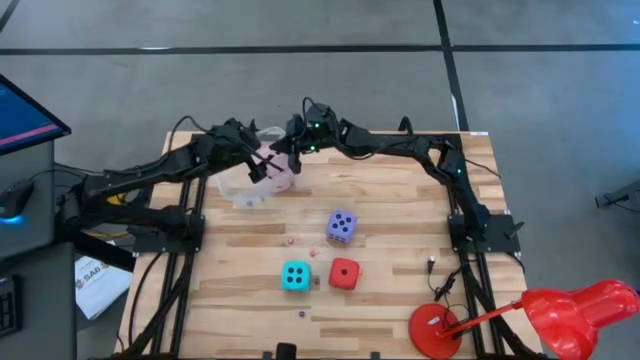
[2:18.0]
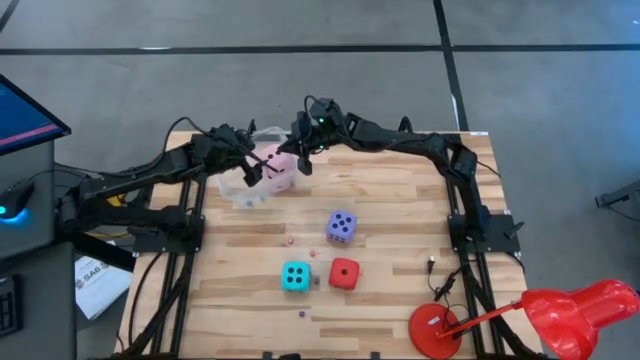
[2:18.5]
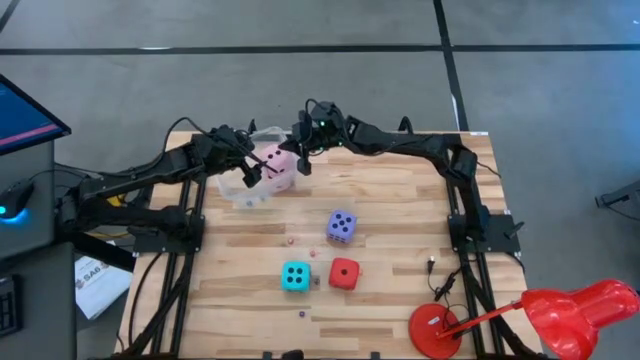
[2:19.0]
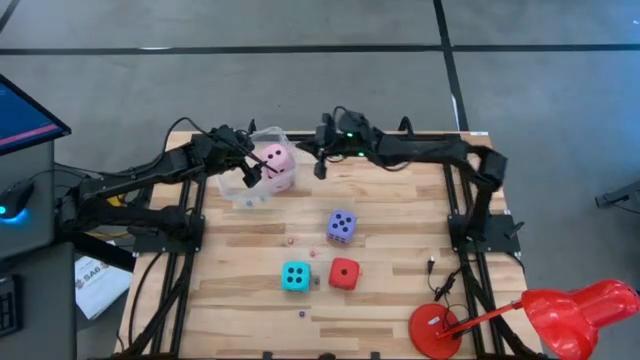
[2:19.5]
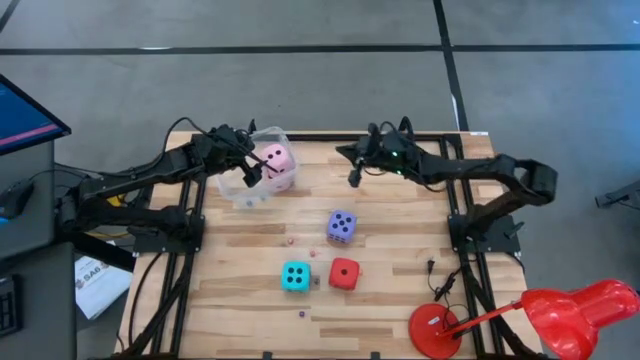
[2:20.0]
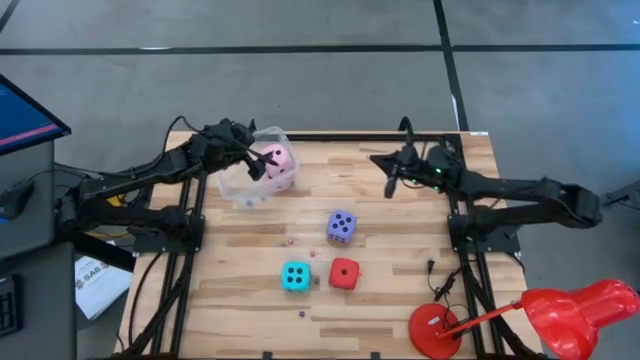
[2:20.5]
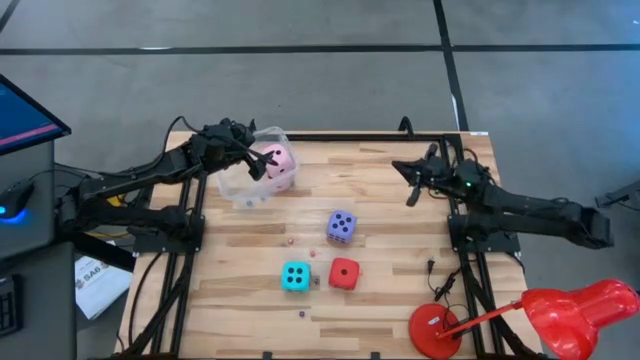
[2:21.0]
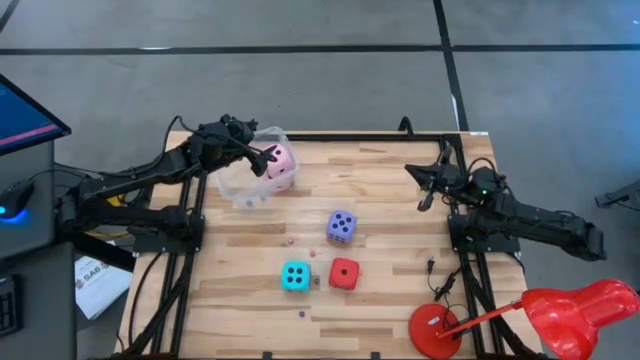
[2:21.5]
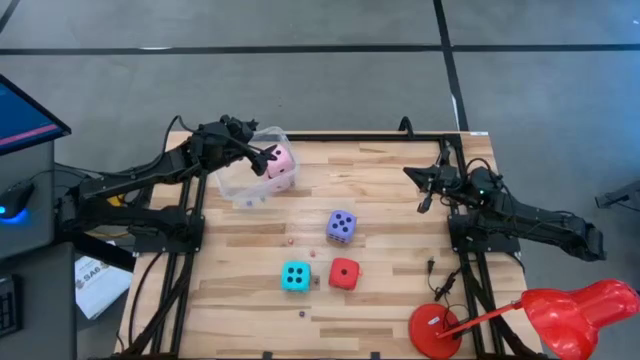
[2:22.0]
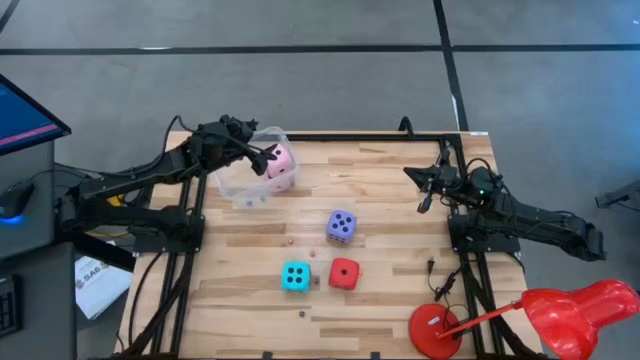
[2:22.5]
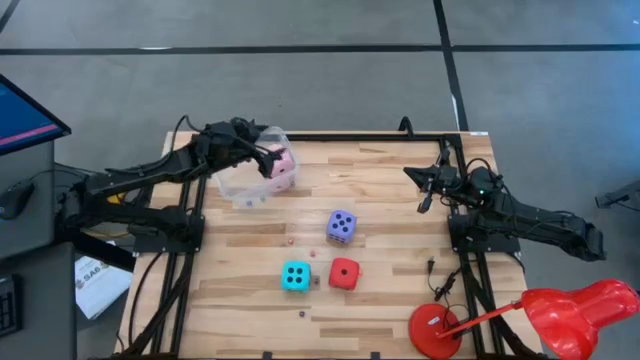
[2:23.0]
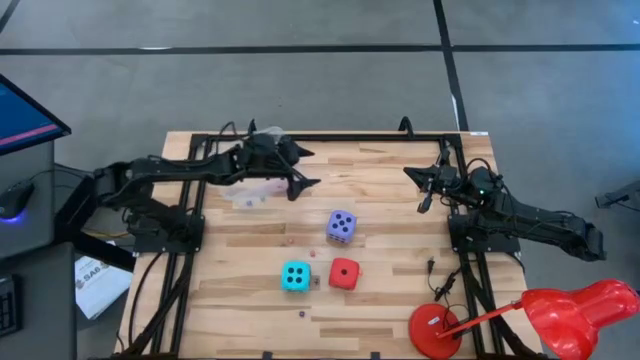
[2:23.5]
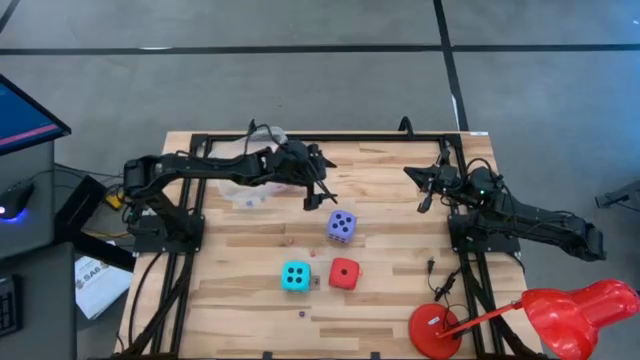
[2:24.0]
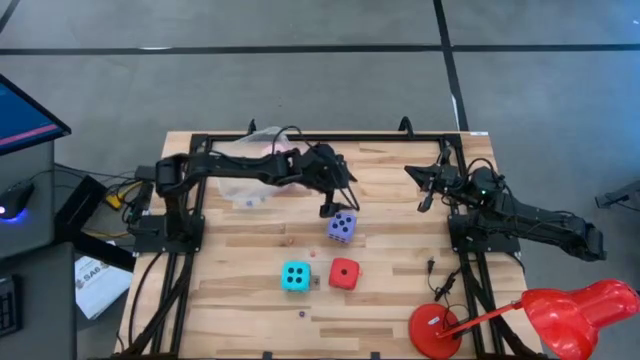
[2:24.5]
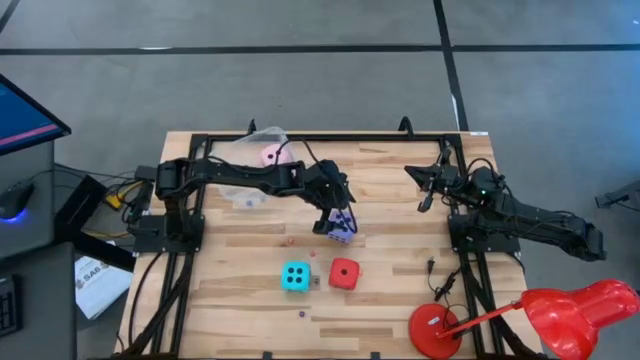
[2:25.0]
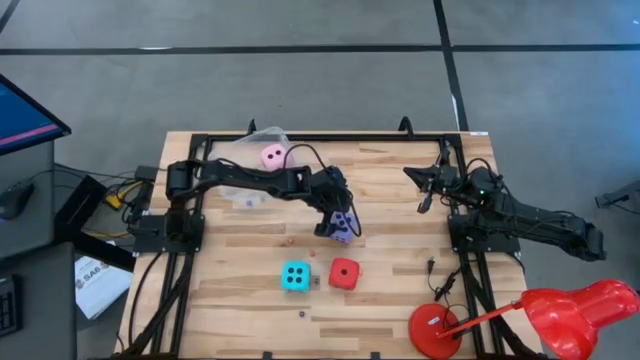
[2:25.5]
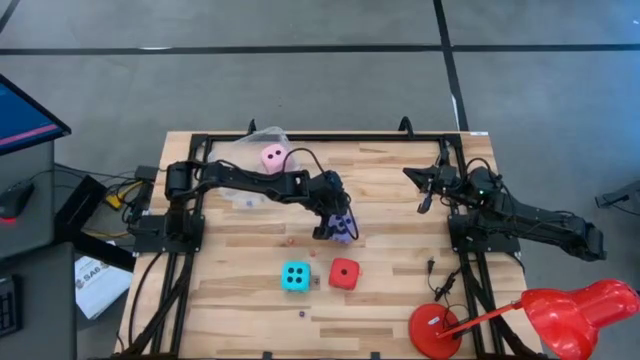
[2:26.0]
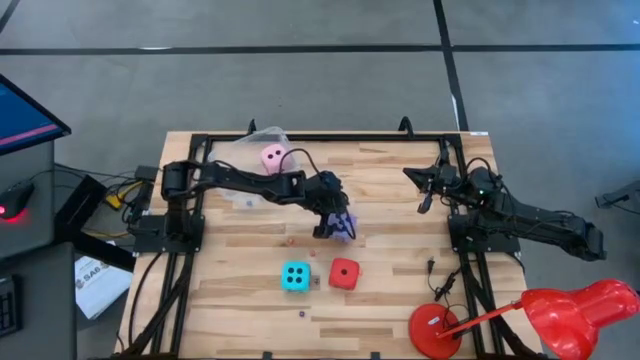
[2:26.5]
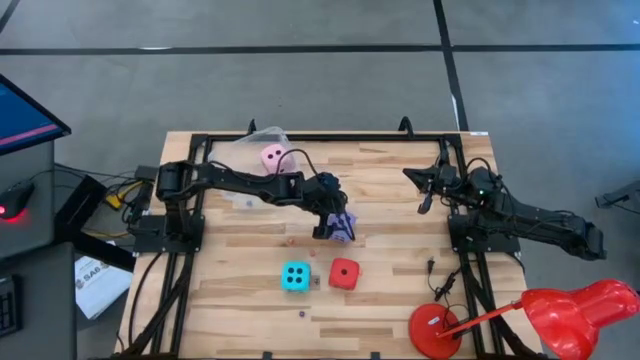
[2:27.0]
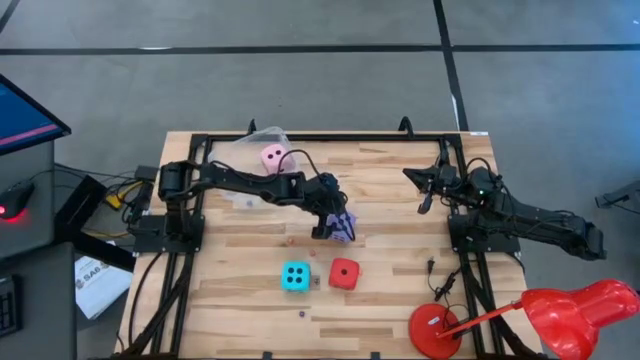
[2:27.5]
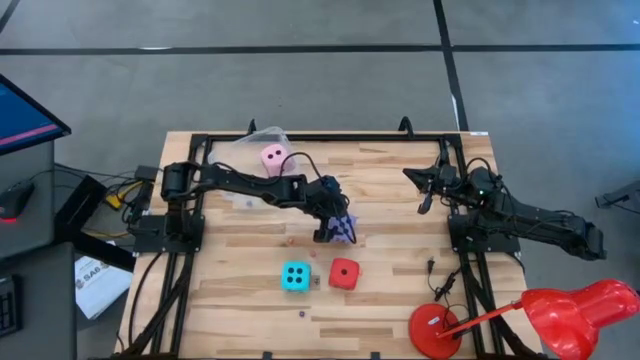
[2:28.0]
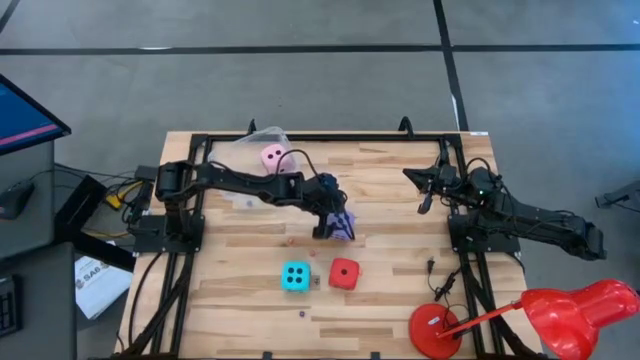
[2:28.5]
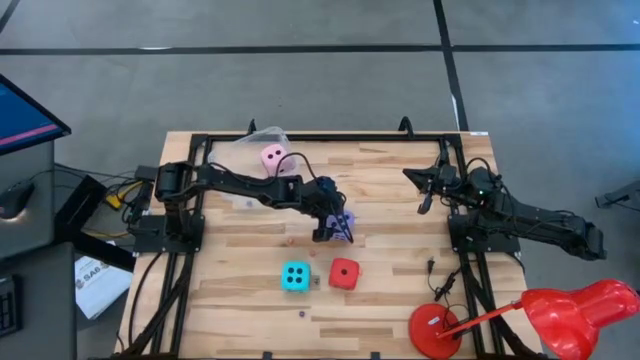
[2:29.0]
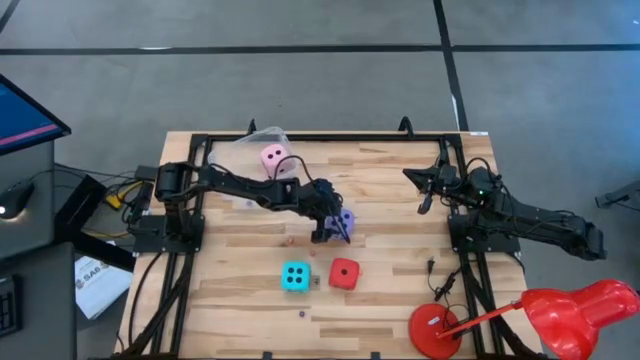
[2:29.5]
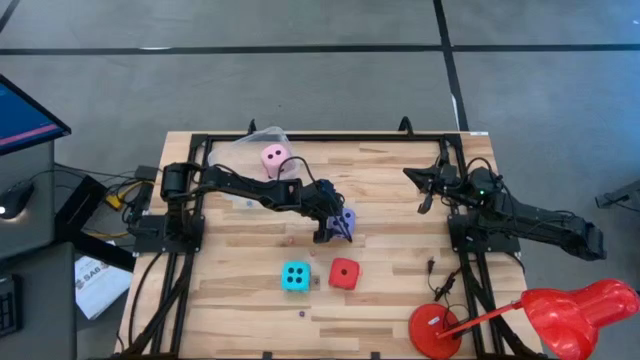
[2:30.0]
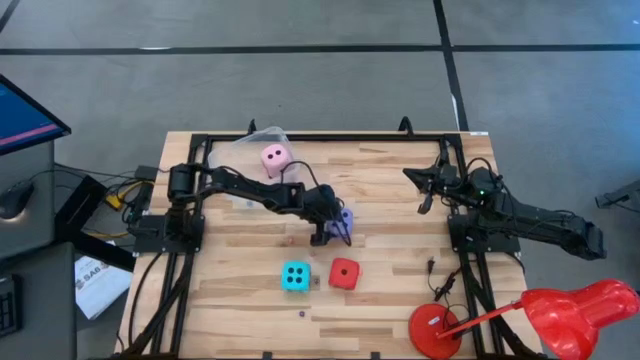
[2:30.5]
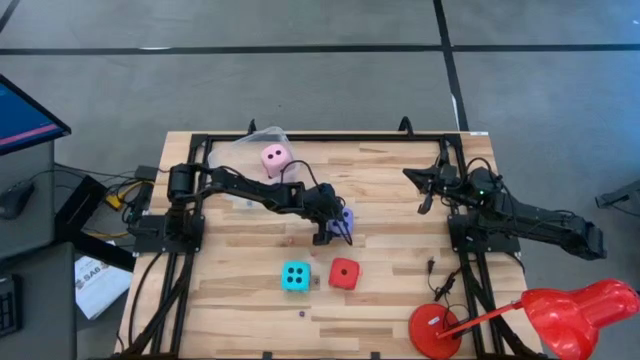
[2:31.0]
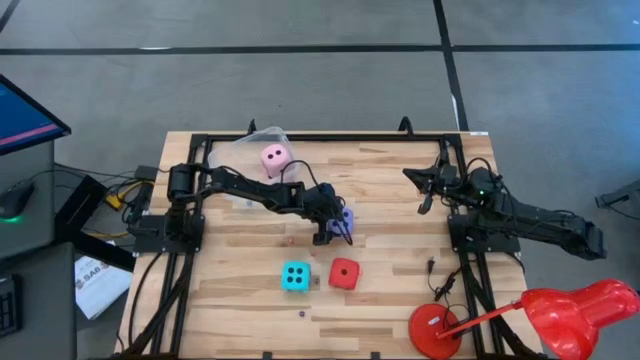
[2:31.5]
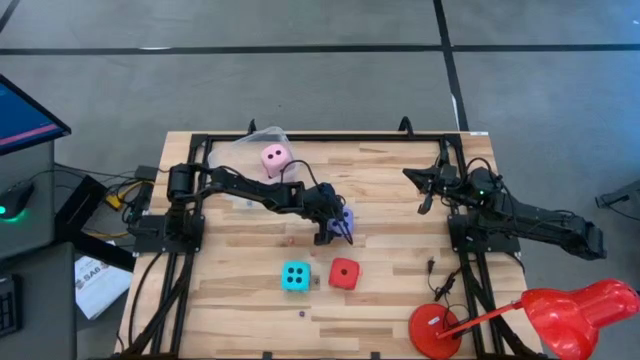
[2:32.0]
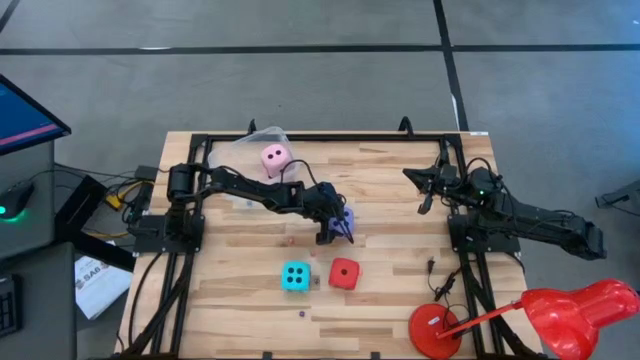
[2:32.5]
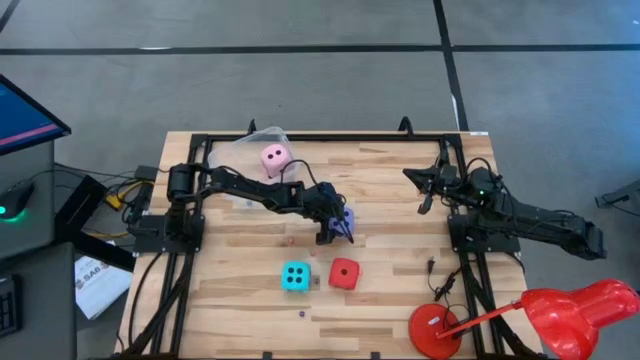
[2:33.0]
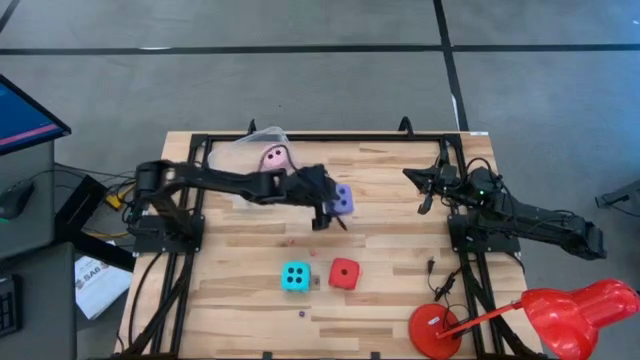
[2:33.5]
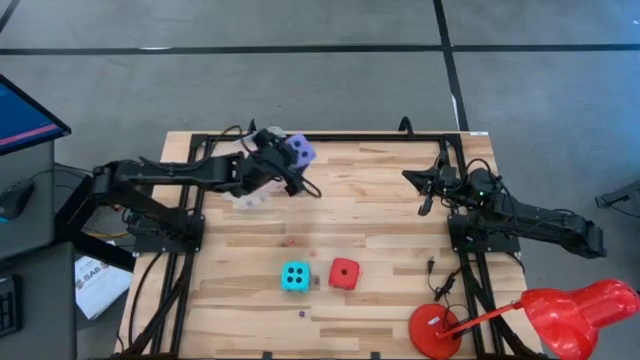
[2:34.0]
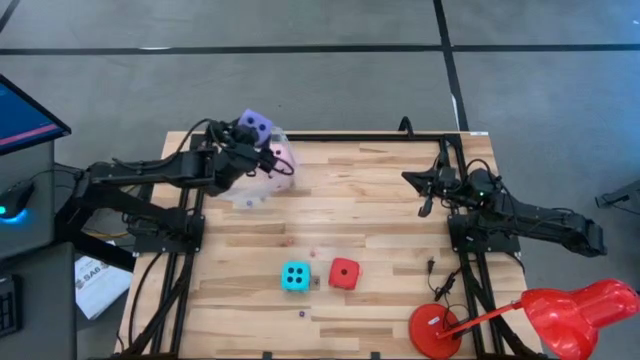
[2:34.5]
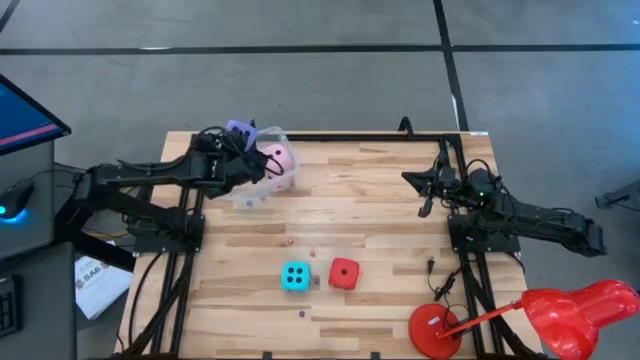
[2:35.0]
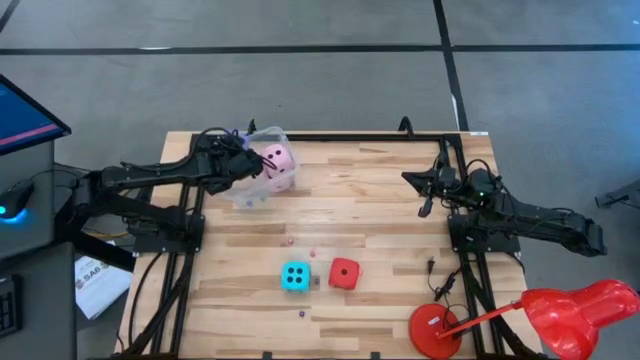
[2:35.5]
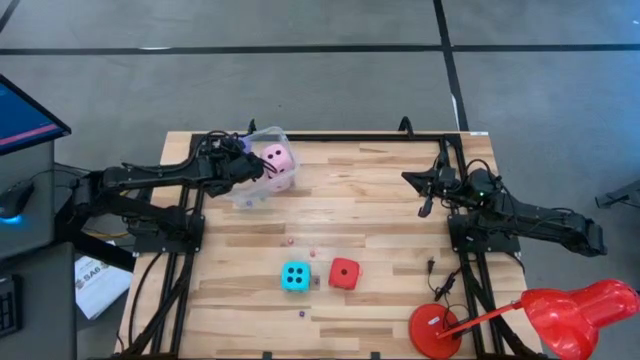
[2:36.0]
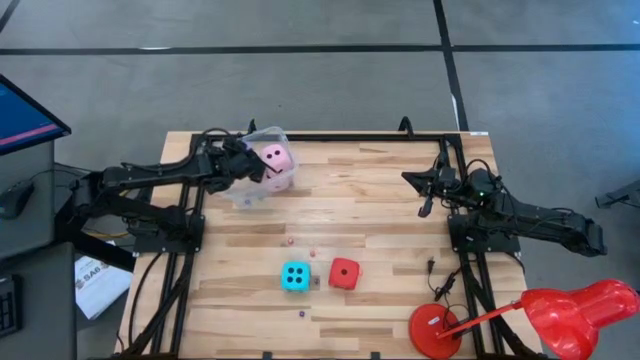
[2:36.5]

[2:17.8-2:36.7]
Task: Pick & Place Dice
Put the large purple dice into the transparent container

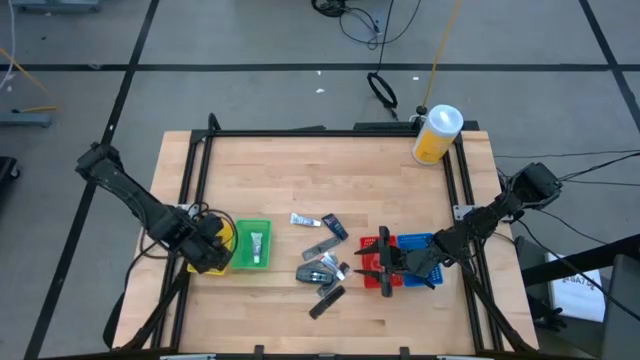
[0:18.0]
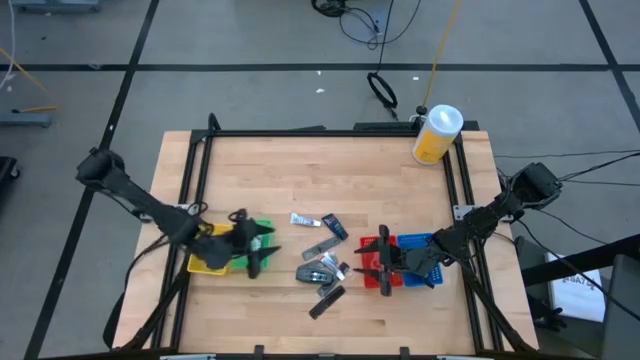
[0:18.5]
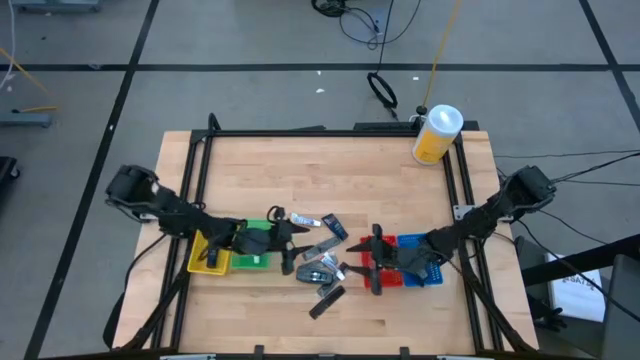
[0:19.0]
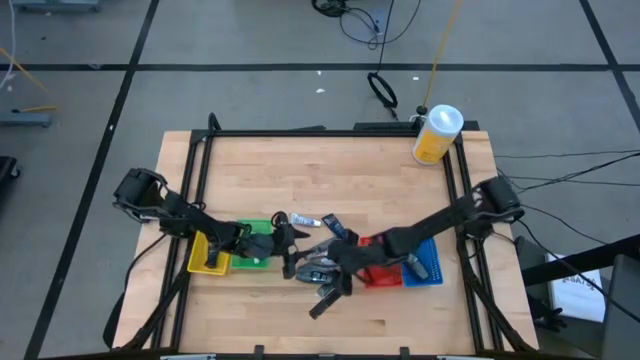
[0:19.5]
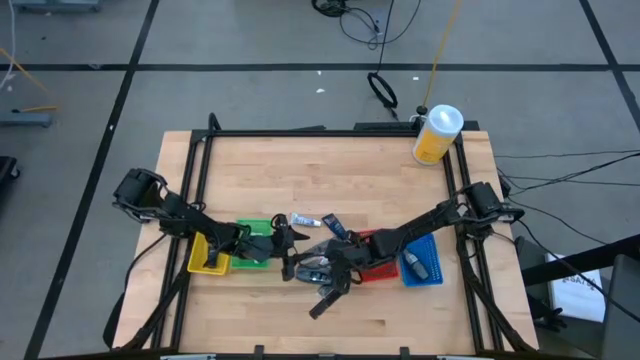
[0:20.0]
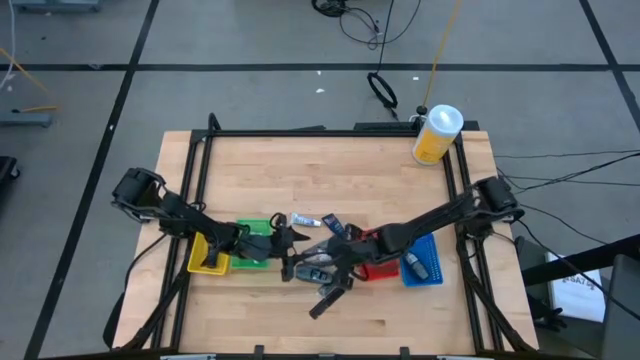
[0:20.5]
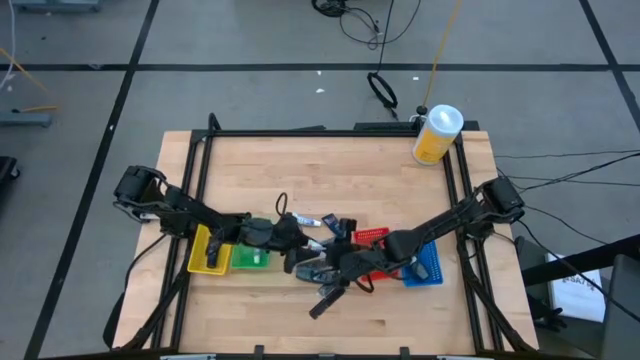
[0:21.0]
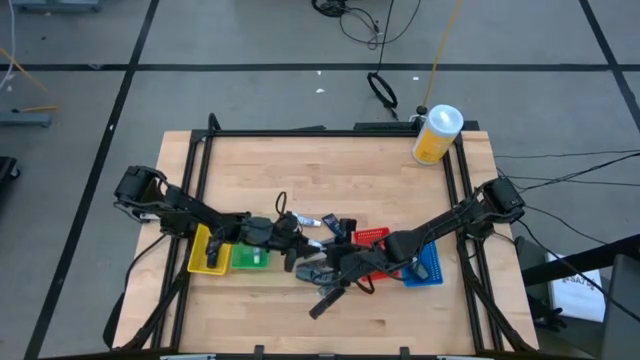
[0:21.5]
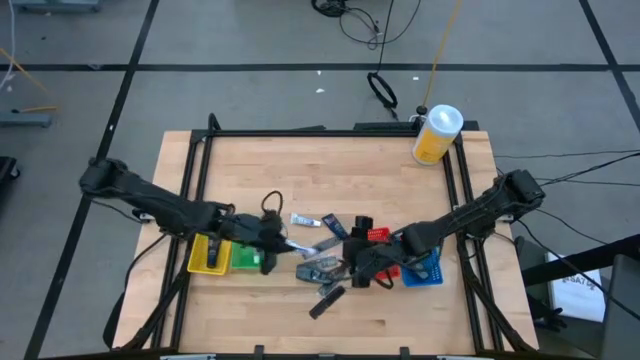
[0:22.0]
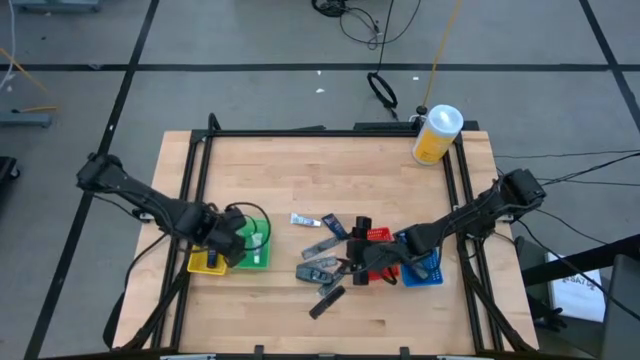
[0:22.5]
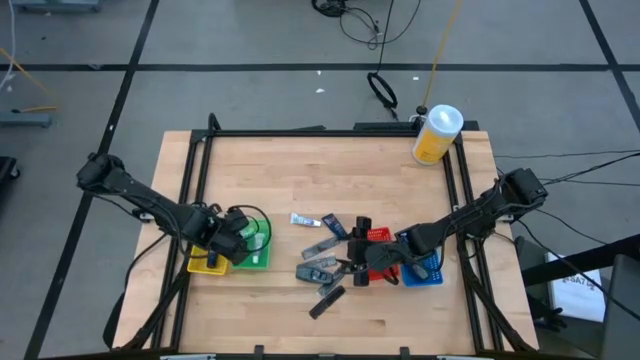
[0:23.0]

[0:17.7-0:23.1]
Task: Pick & Place Travel size toiletries
Put the white toothpaste into the green bin
